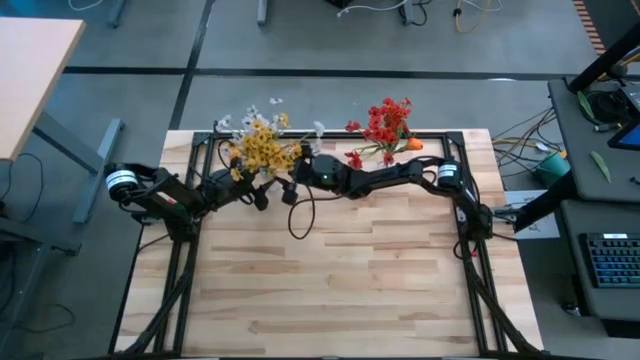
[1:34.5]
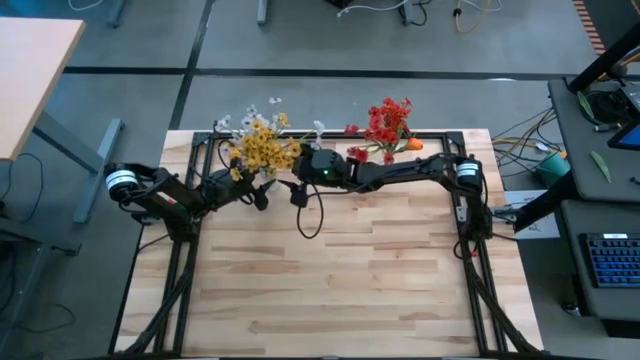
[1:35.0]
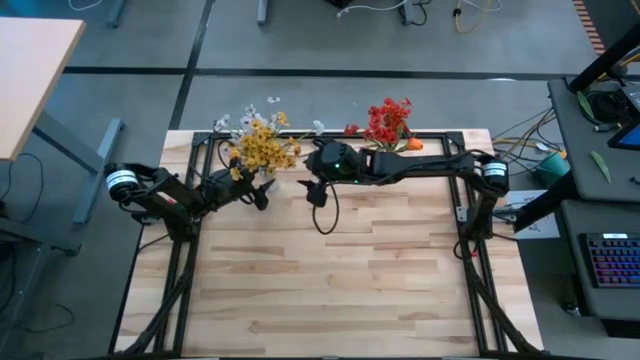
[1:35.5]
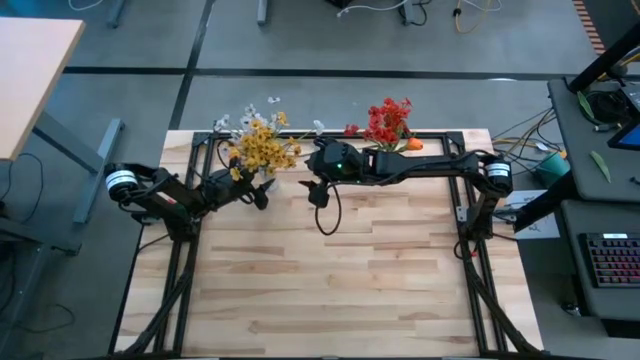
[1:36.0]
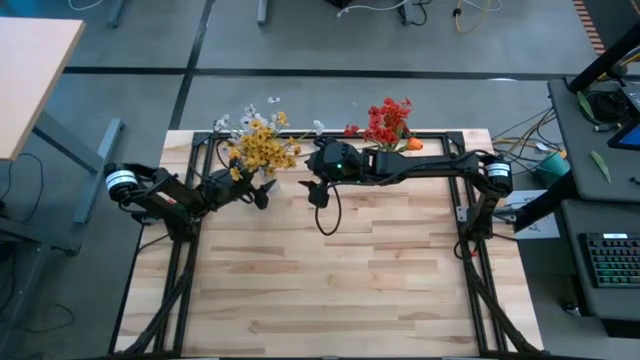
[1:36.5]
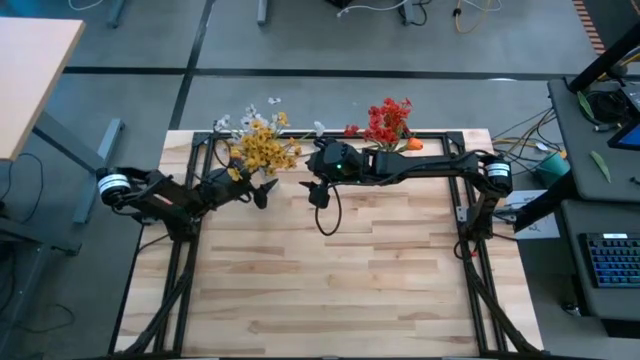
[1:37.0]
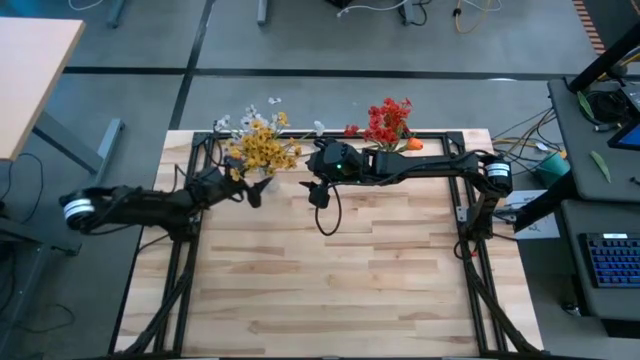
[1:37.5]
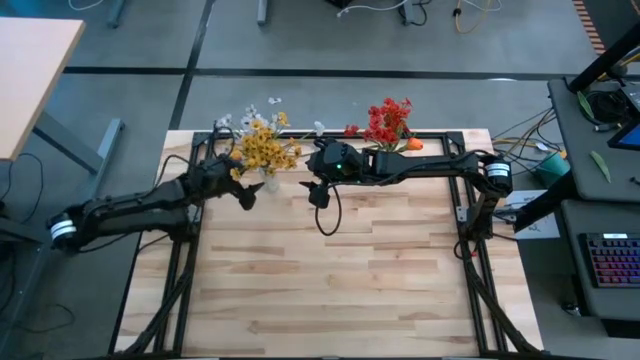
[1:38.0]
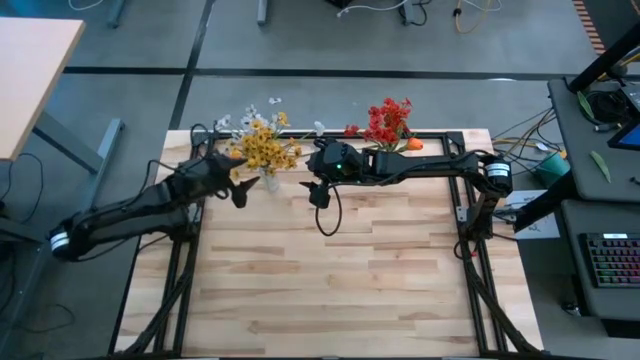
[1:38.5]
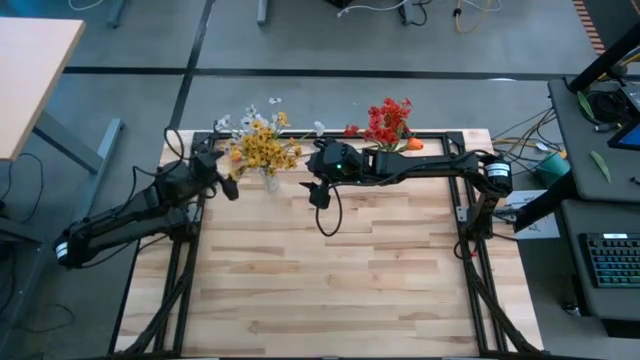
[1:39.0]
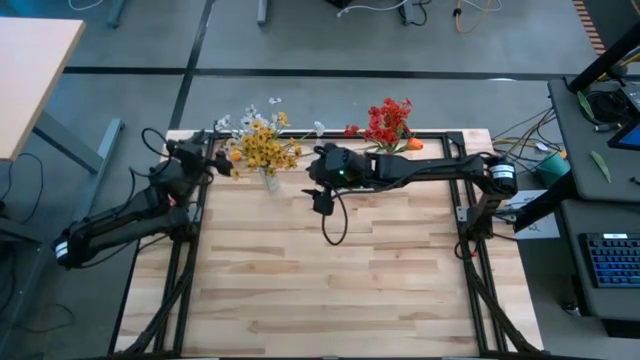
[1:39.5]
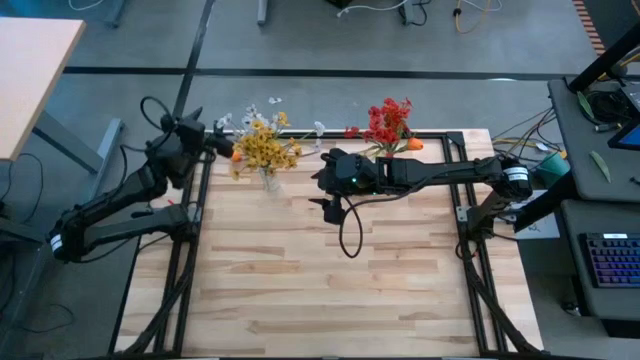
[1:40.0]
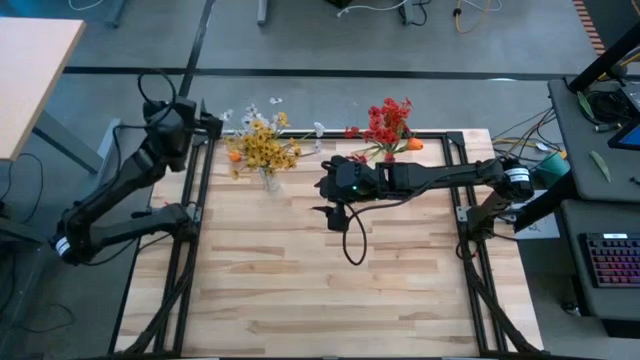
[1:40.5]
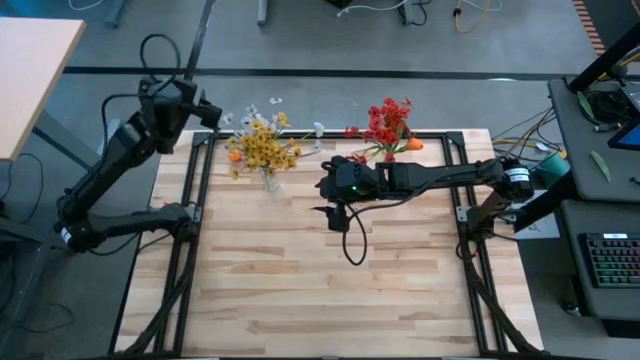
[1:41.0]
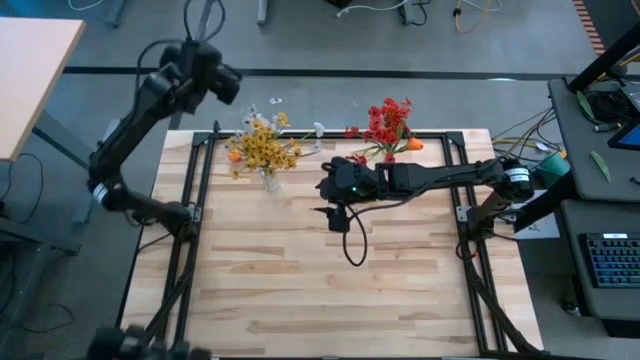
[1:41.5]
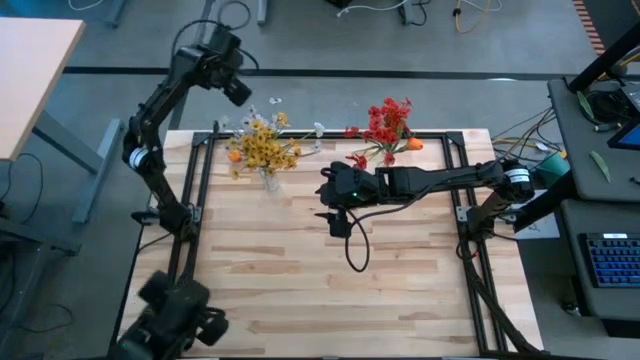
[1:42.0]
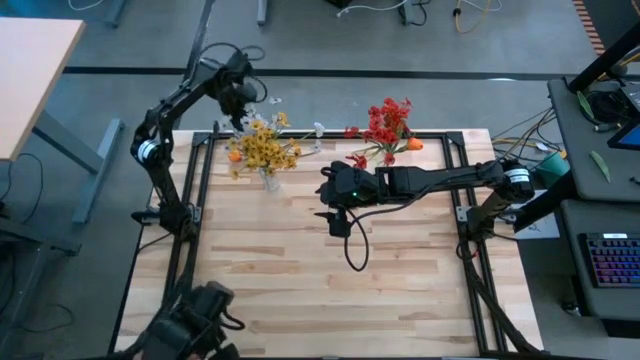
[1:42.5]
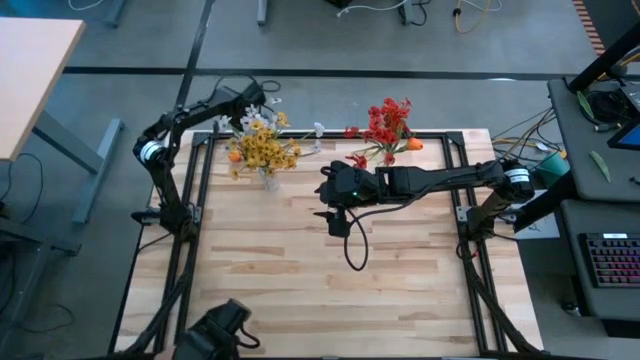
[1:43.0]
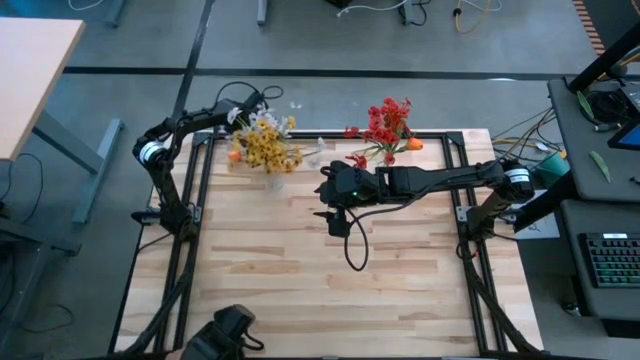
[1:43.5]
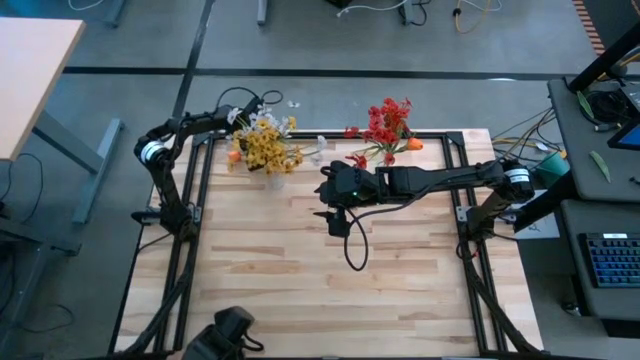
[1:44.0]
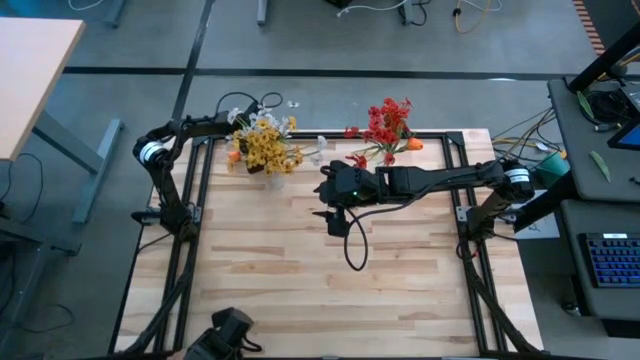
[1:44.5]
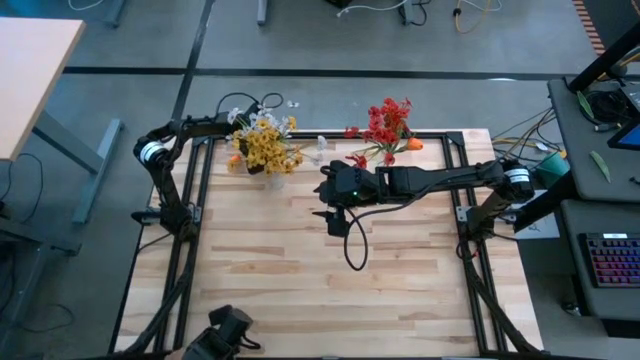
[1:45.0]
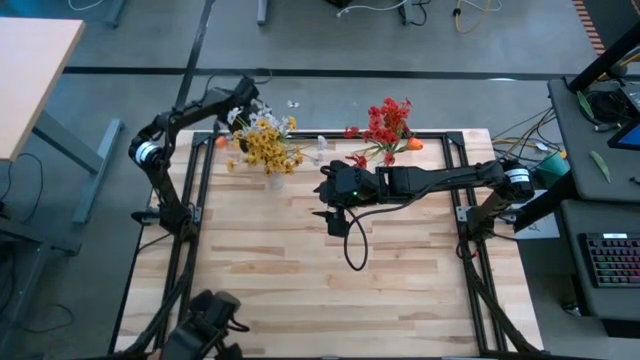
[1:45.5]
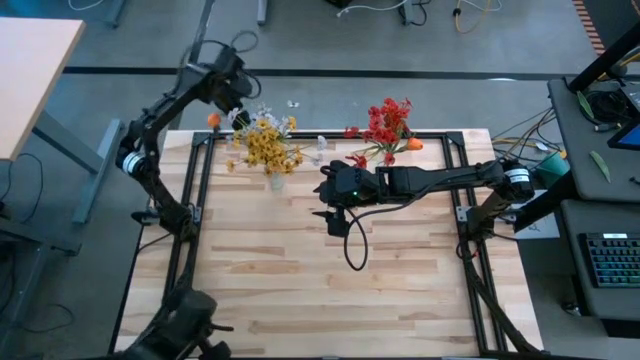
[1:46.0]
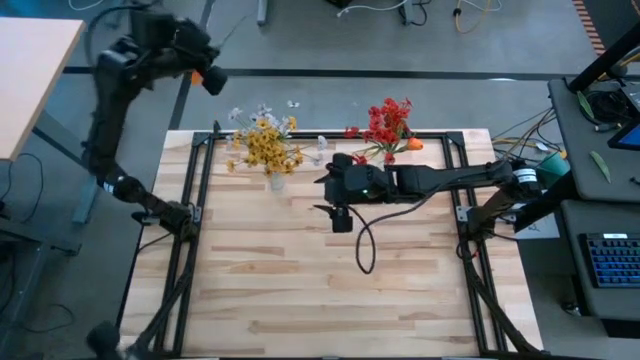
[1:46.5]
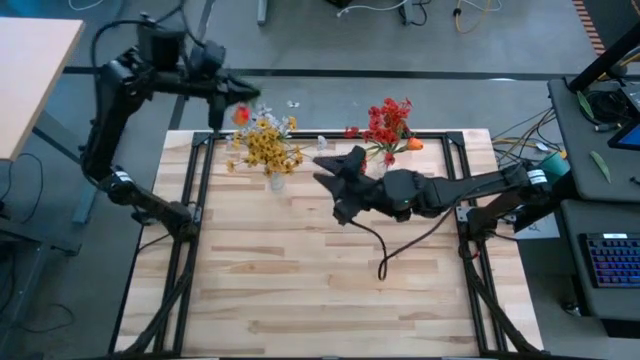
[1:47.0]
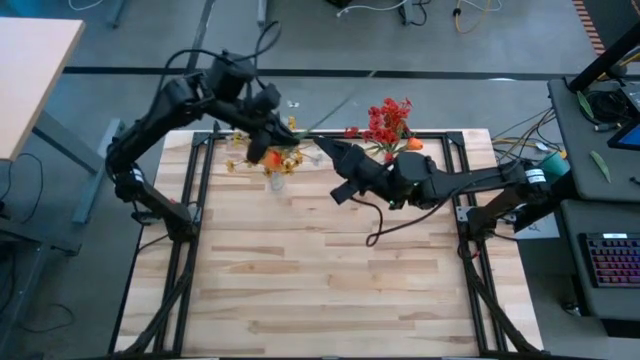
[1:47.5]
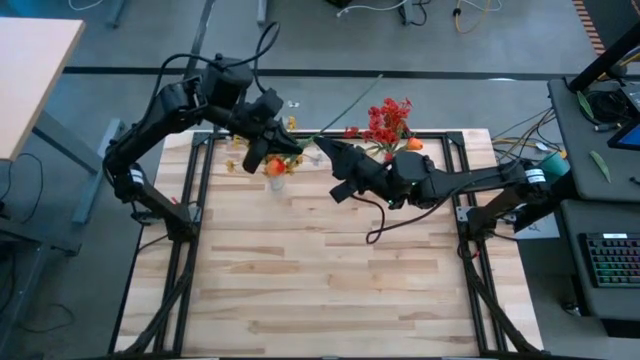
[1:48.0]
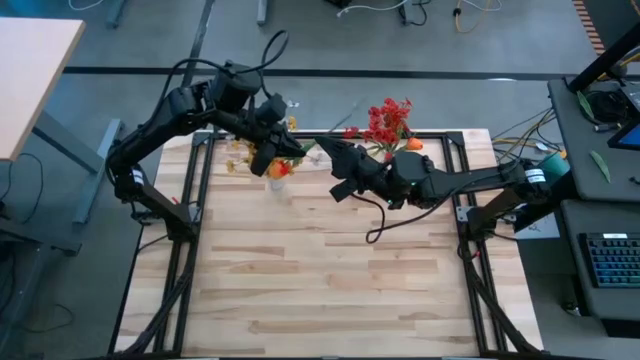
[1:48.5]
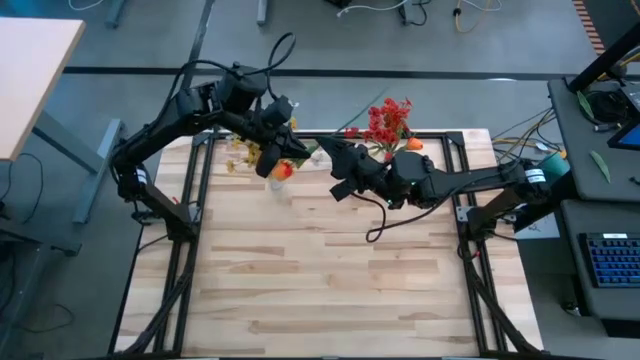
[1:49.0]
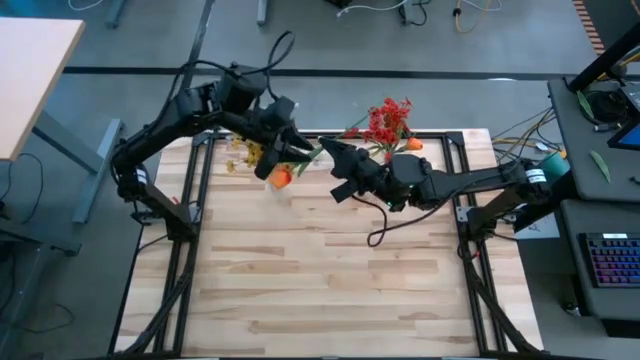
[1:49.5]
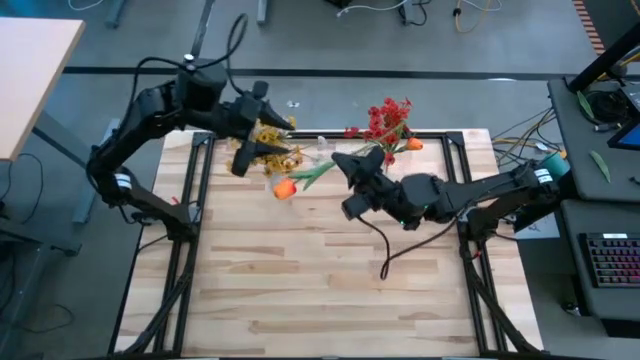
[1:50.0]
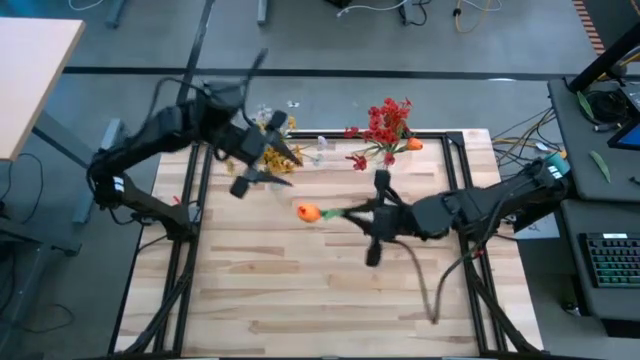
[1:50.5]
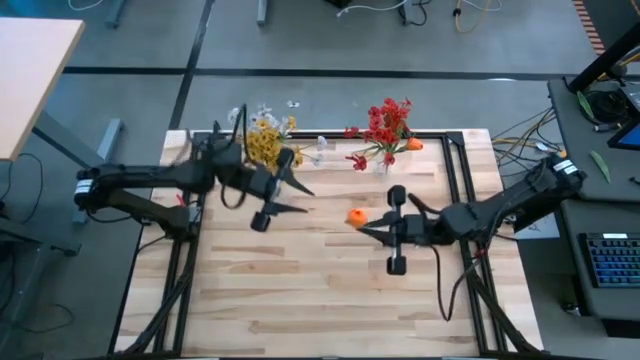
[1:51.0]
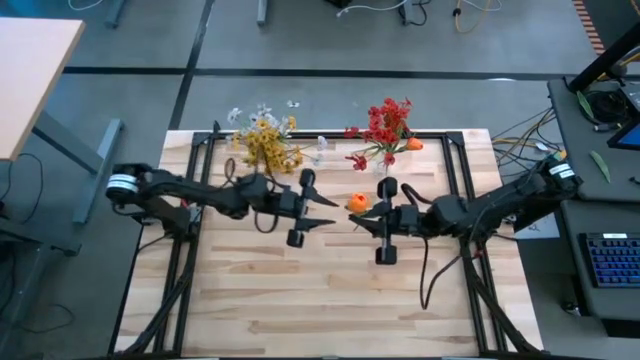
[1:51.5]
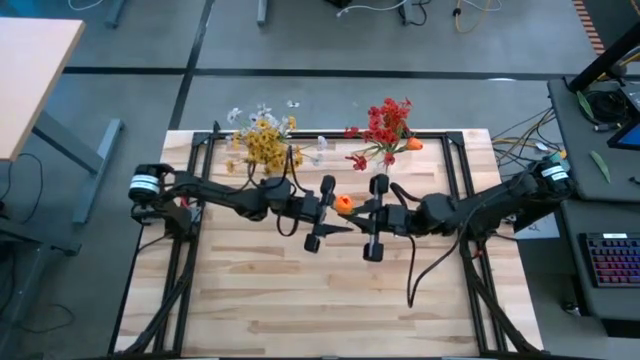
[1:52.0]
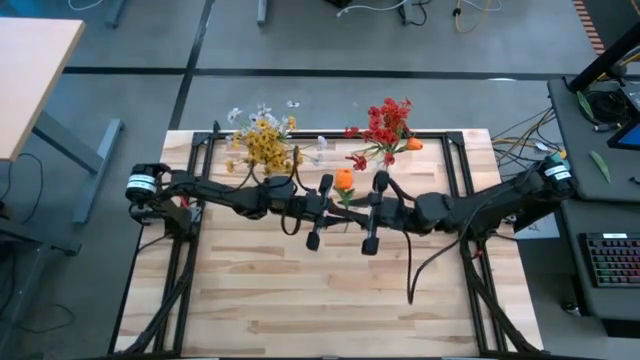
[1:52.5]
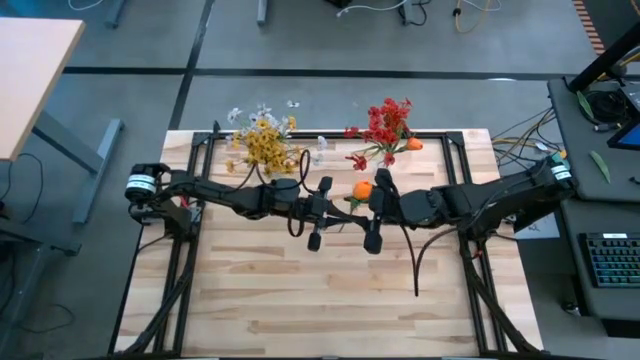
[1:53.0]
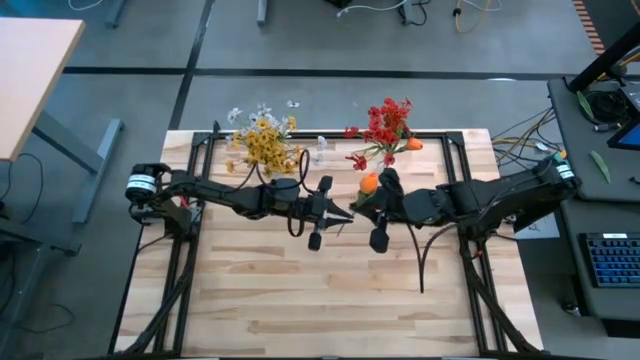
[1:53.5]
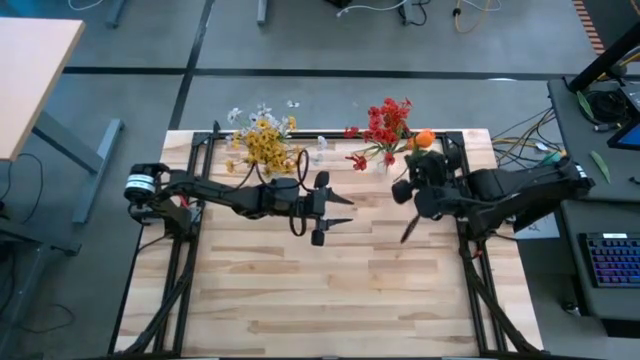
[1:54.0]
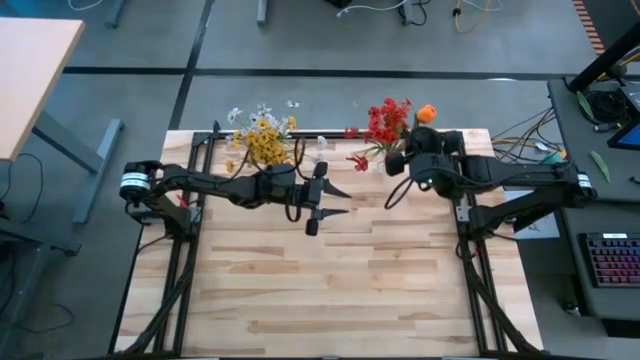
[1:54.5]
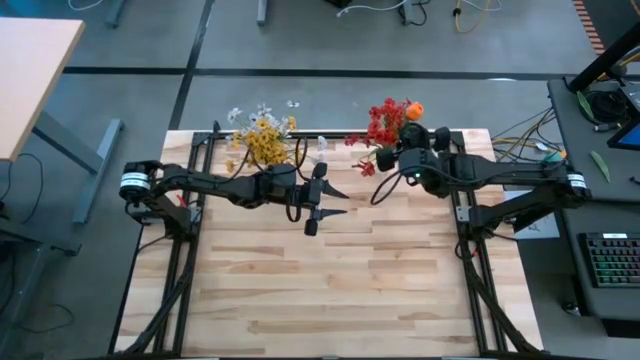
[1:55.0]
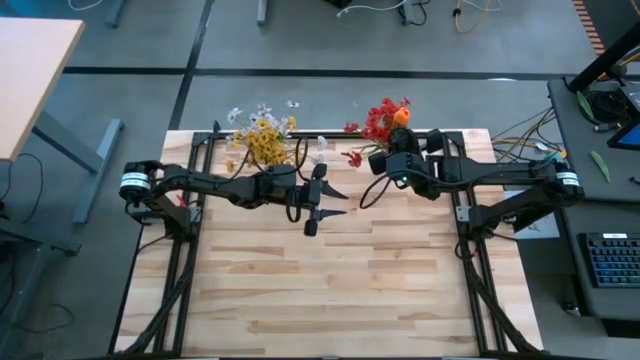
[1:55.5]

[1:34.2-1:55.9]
Task: Sort flowers into vase by color
Put the orange tulip into the right transparent flower vase

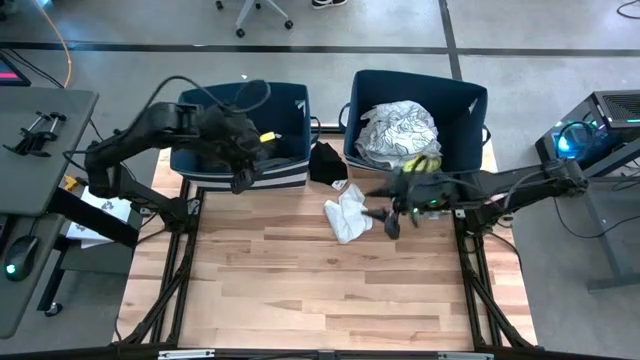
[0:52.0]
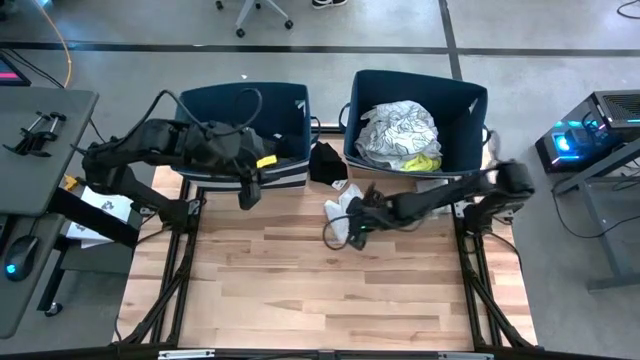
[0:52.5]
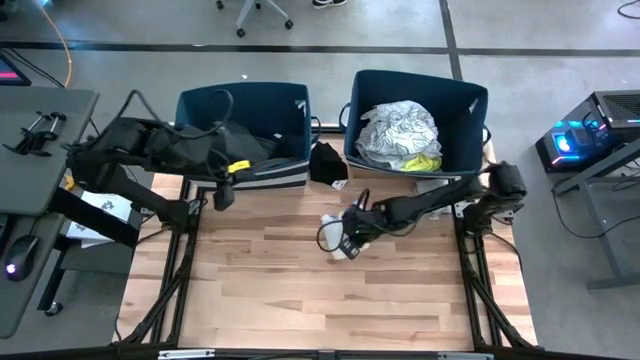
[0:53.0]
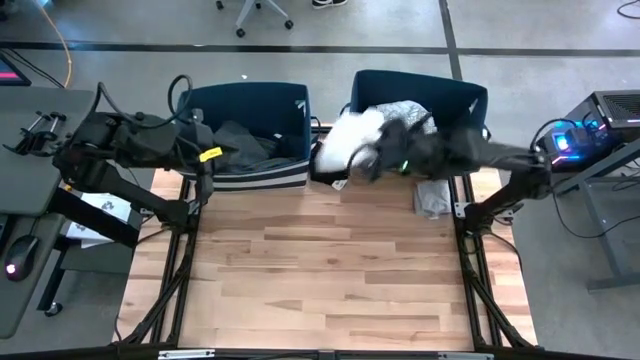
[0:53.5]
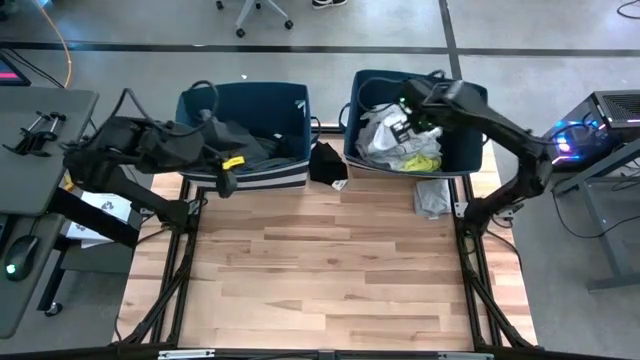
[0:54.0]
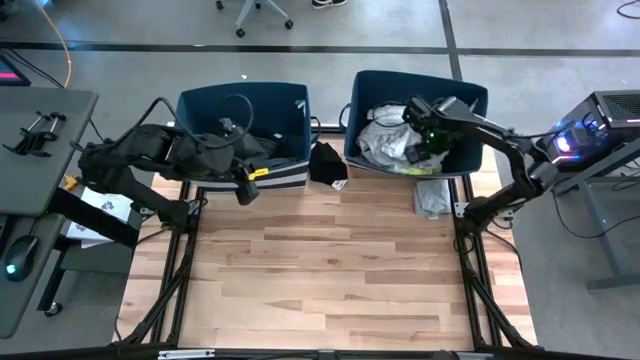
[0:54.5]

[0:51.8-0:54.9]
Task: Sort clothes
Put the white underwear into the right laundry bin
